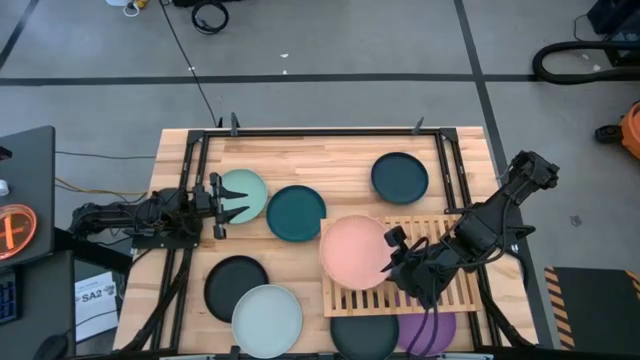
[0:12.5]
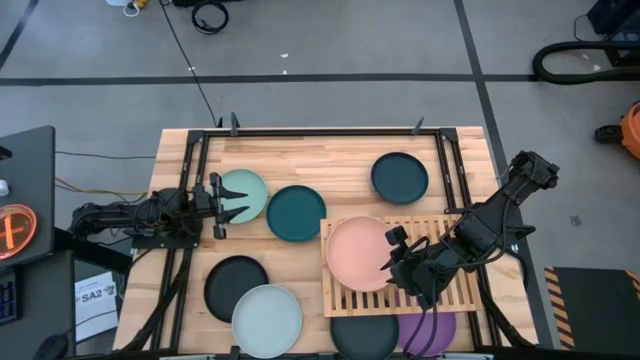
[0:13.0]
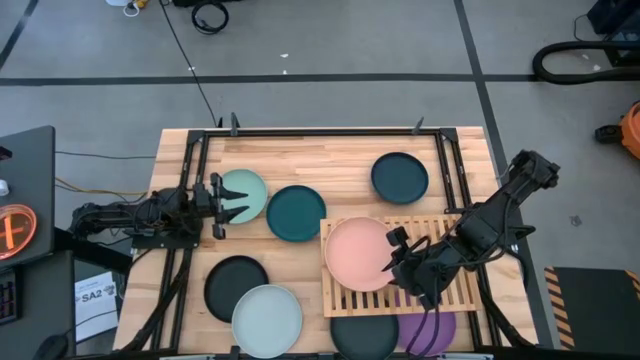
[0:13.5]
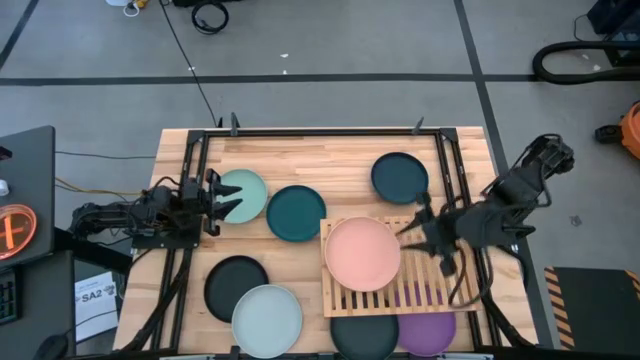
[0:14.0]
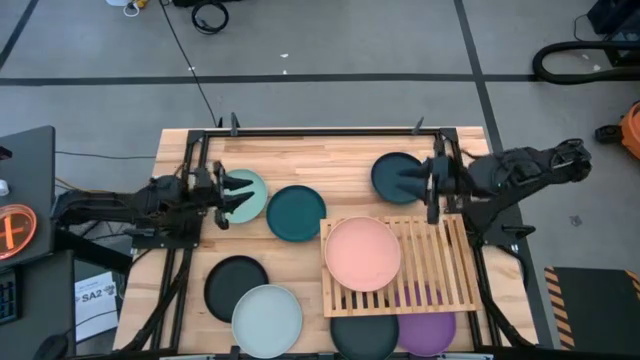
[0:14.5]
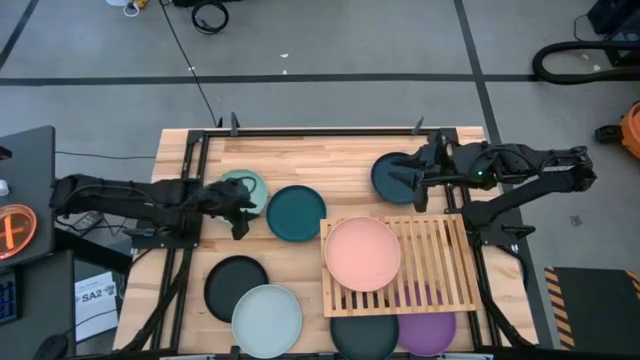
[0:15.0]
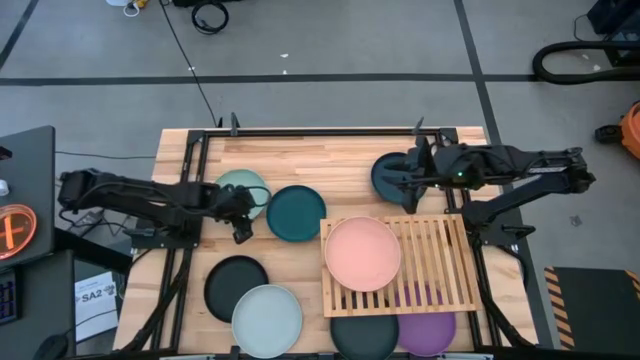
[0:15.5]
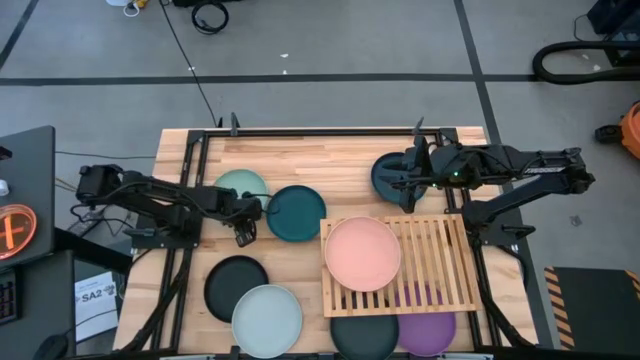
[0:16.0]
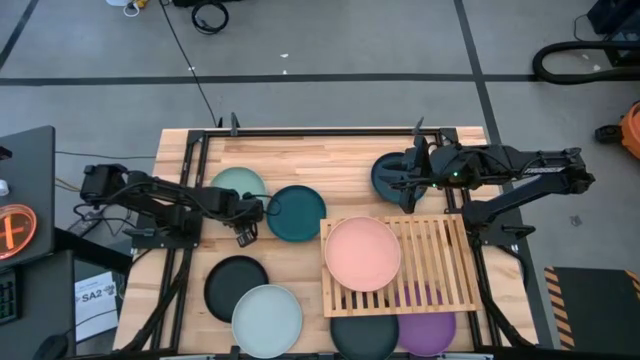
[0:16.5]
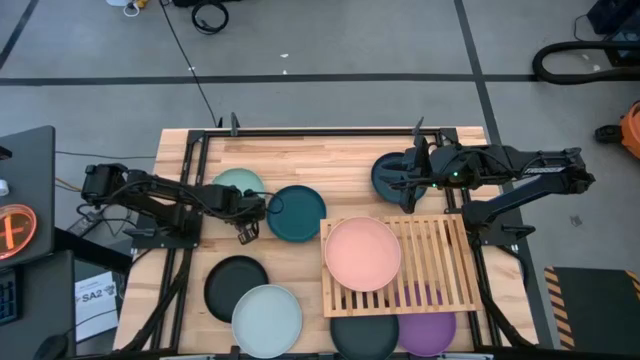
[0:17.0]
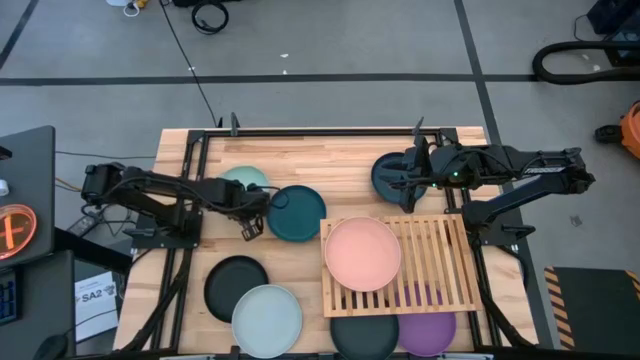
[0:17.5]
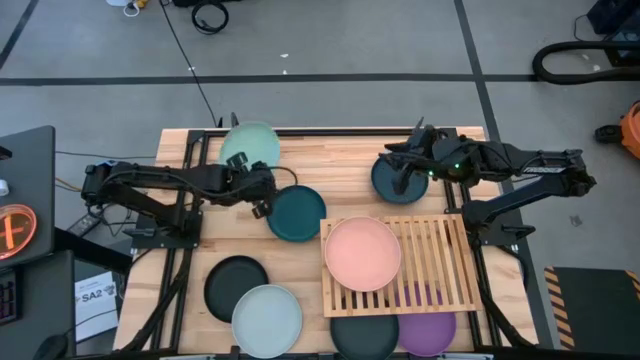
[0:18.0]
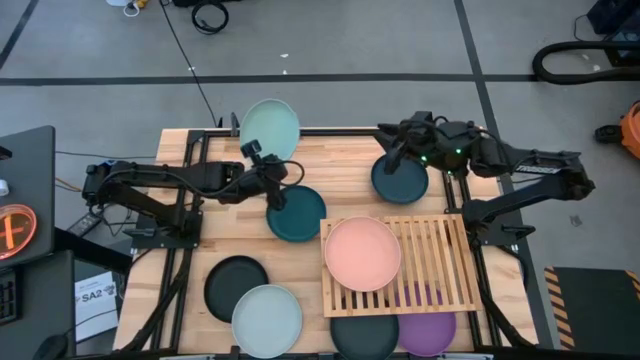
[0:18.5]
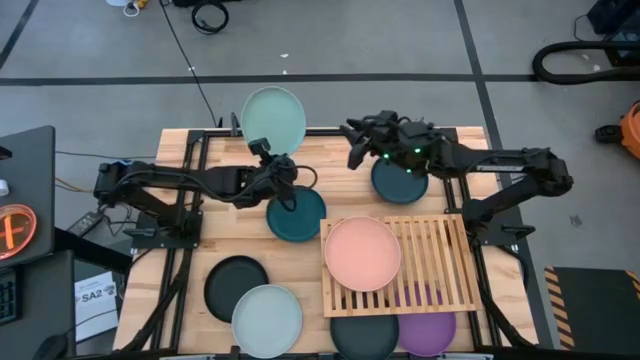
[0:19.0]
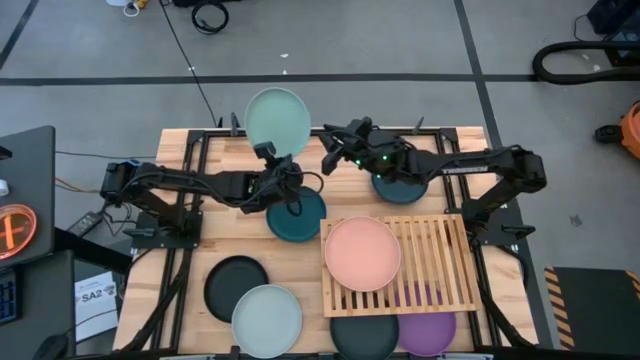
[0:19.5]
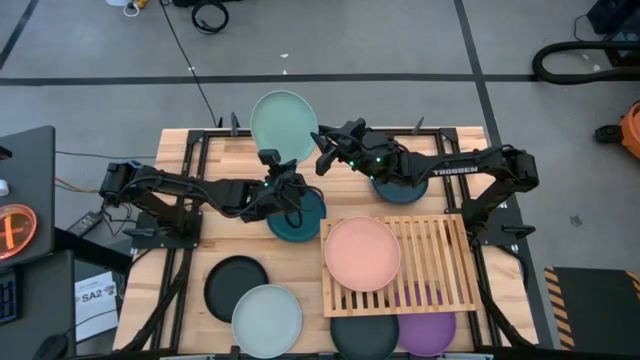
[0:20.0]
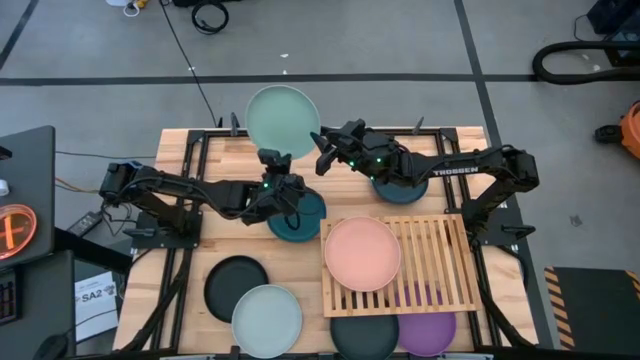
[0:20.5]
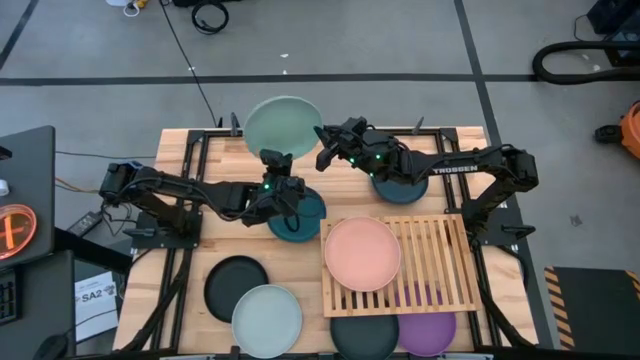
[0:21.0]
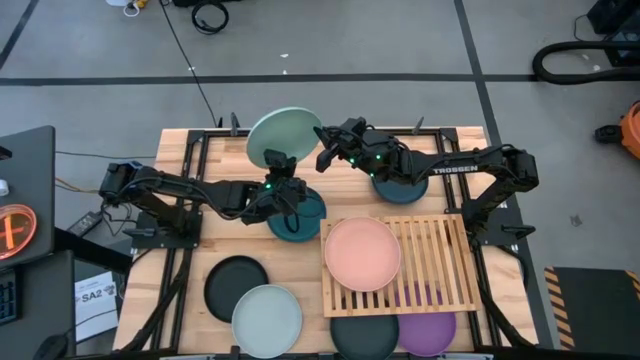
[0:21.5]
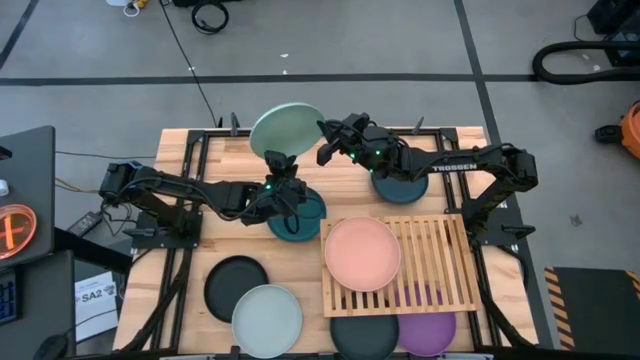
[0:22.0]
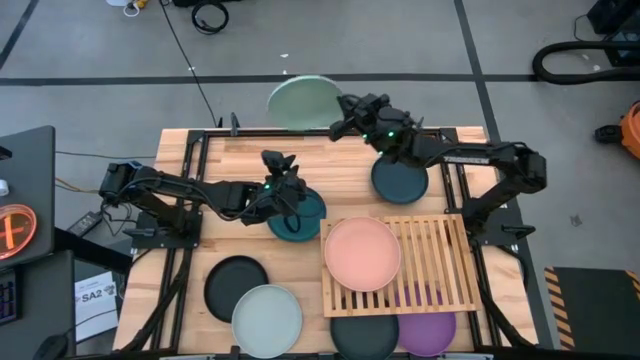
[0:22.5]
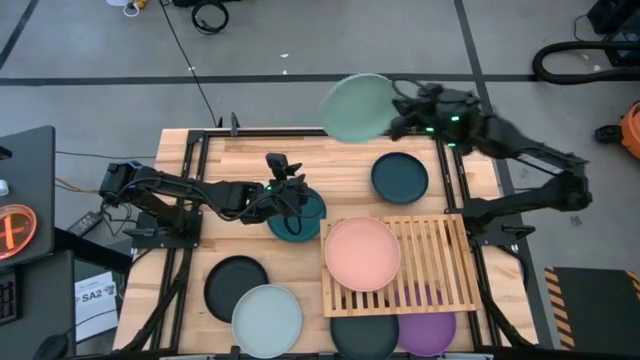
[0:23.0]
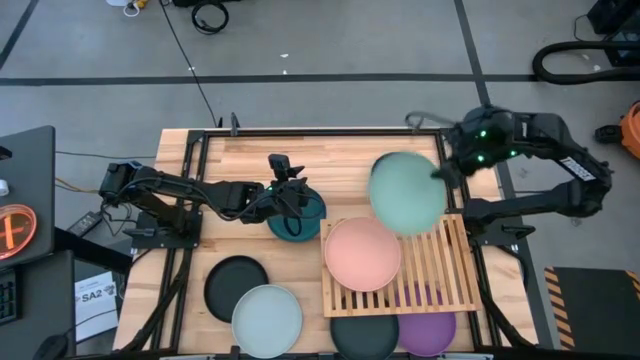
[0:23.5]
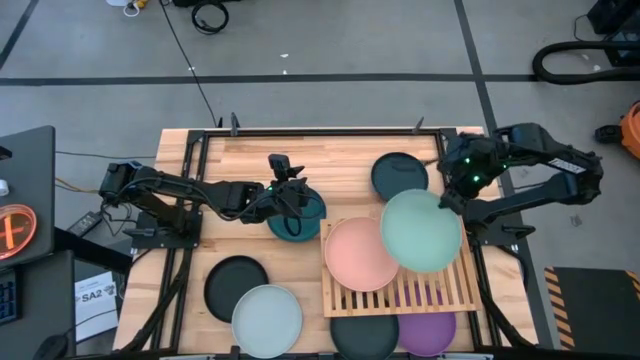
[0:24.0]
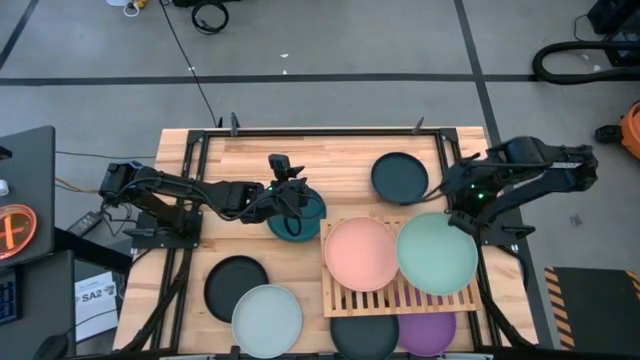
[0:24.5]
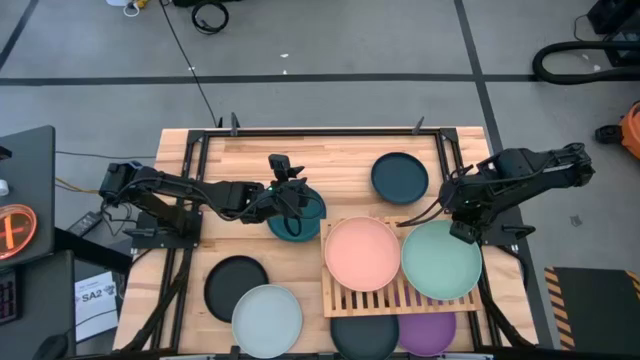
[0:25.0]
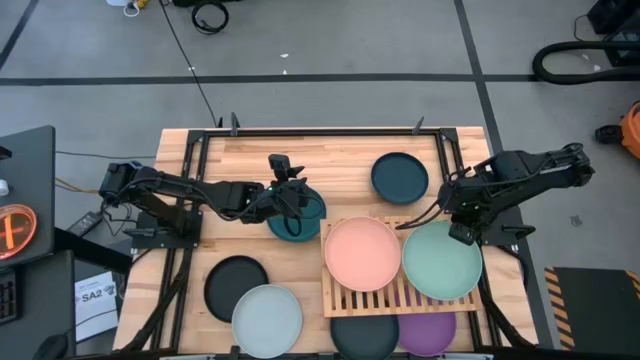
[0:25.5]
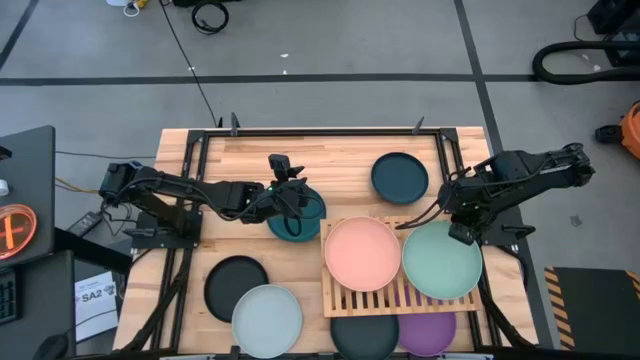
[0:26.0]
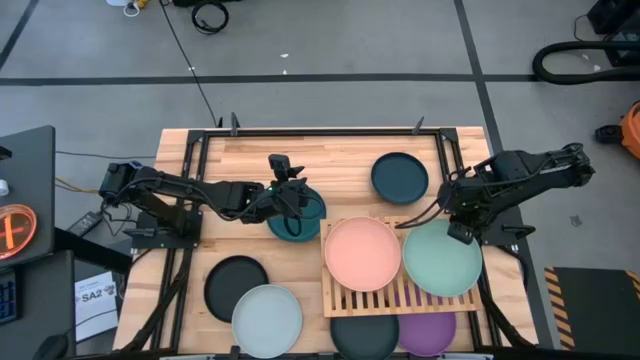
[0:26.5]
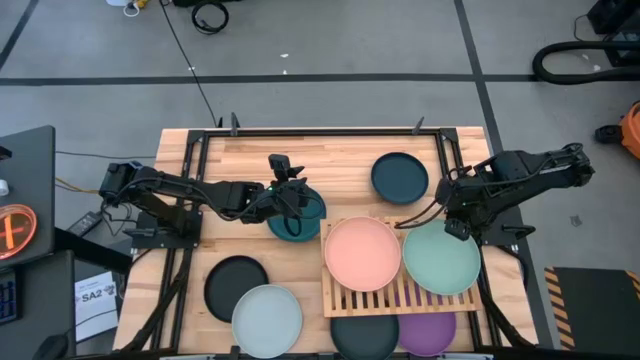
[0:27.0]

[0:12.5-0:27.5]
Task: Place and stack plates onto a shelf
Put the light green plate on the shelf
